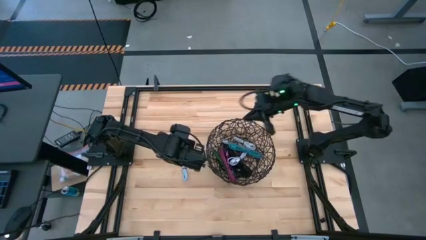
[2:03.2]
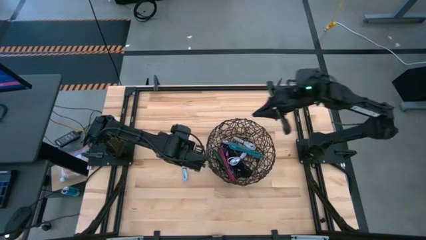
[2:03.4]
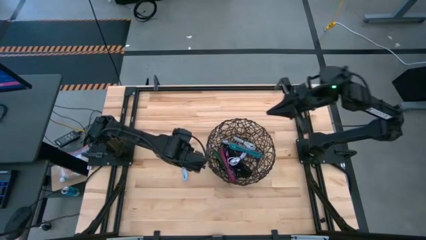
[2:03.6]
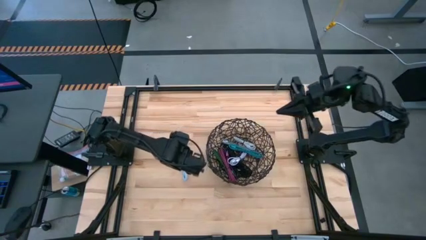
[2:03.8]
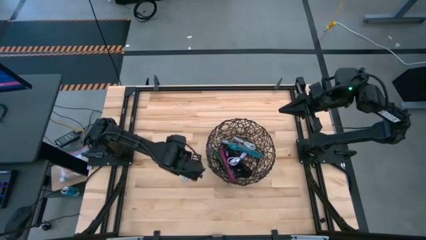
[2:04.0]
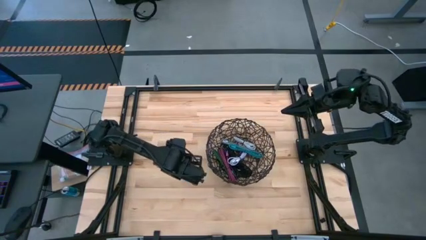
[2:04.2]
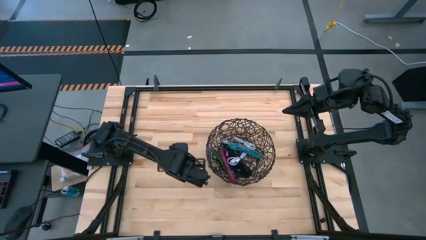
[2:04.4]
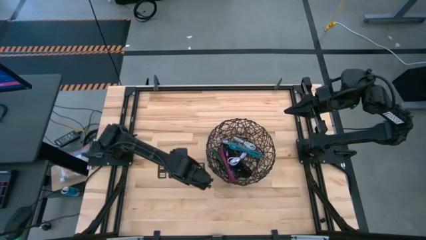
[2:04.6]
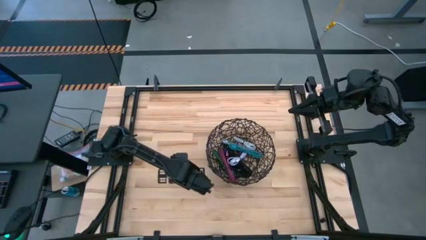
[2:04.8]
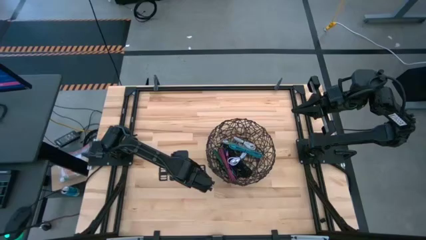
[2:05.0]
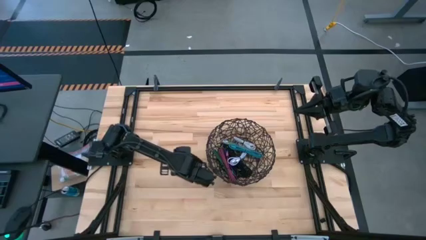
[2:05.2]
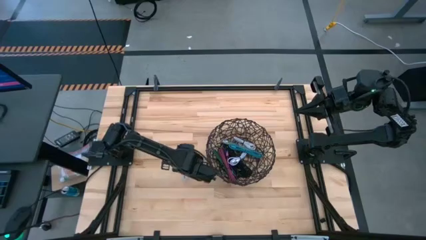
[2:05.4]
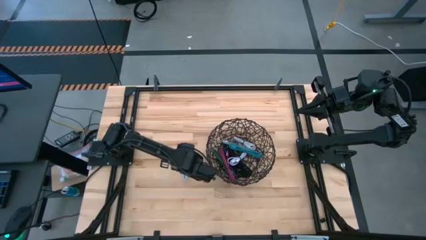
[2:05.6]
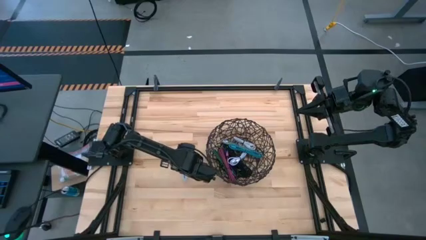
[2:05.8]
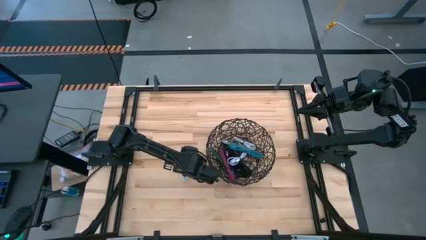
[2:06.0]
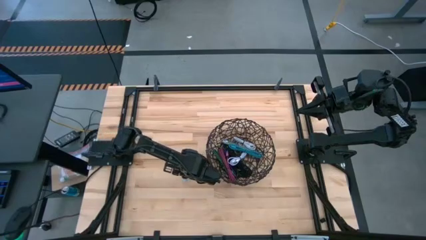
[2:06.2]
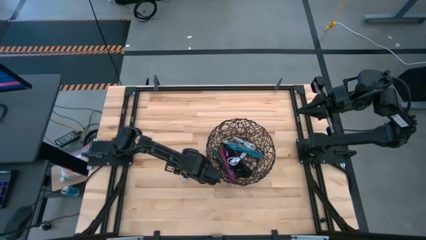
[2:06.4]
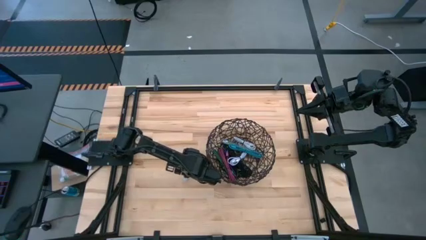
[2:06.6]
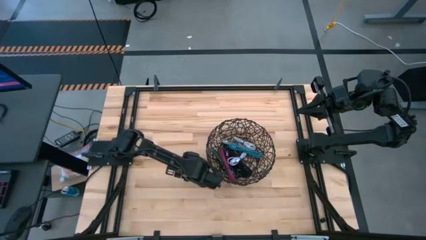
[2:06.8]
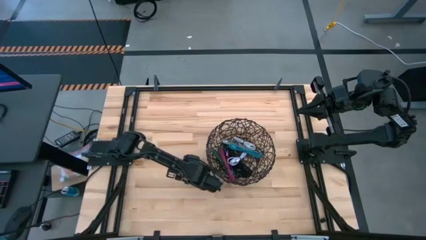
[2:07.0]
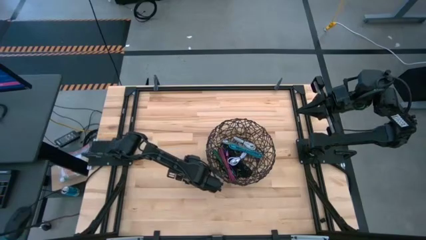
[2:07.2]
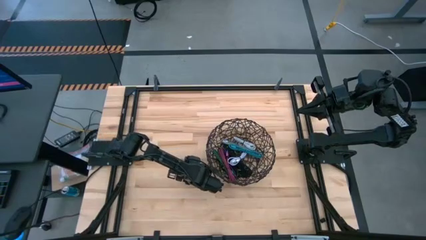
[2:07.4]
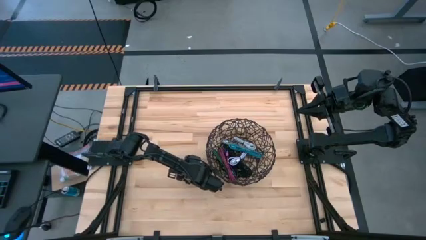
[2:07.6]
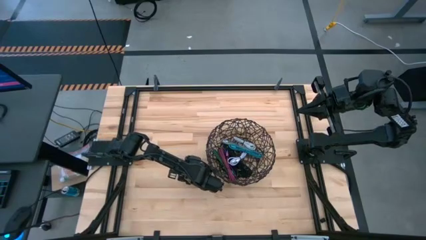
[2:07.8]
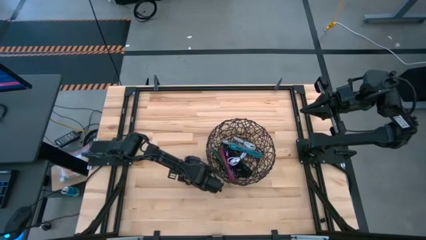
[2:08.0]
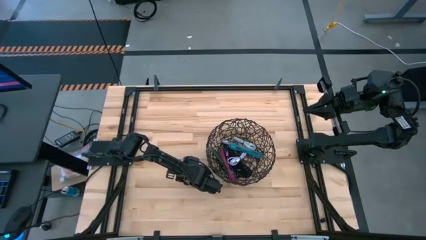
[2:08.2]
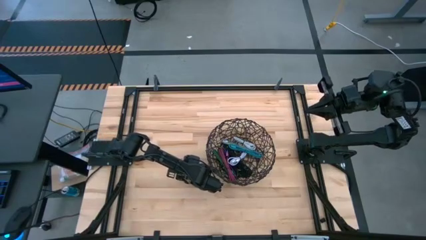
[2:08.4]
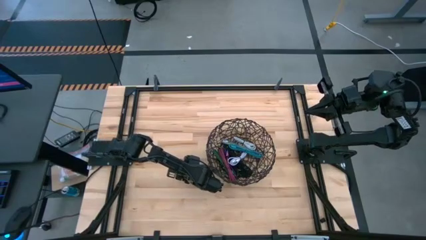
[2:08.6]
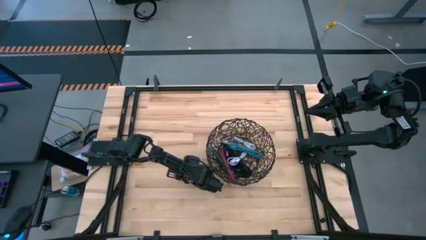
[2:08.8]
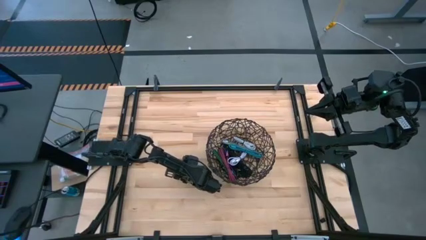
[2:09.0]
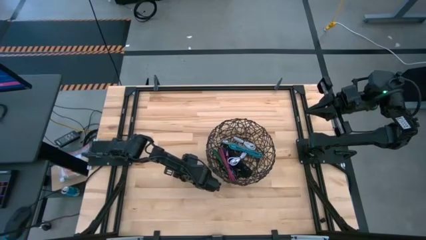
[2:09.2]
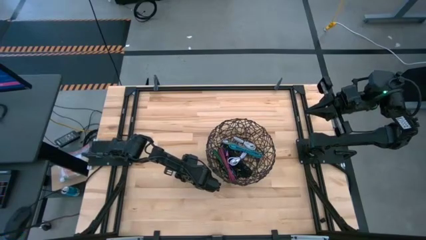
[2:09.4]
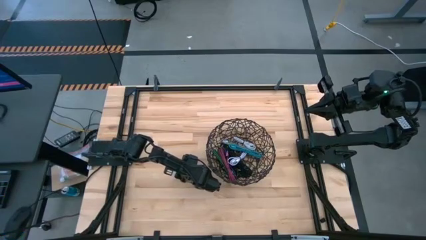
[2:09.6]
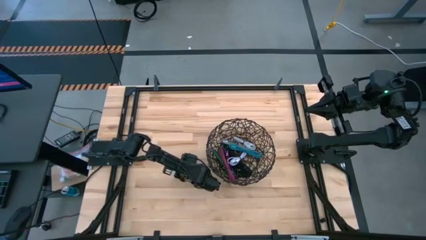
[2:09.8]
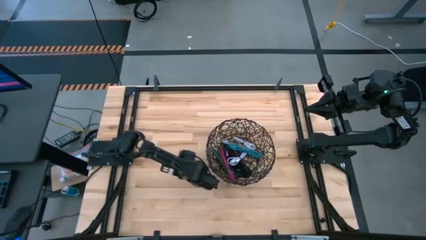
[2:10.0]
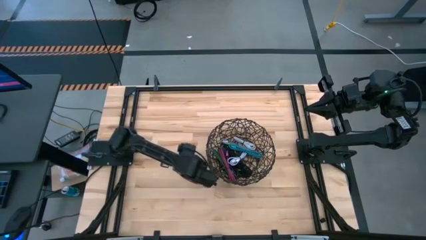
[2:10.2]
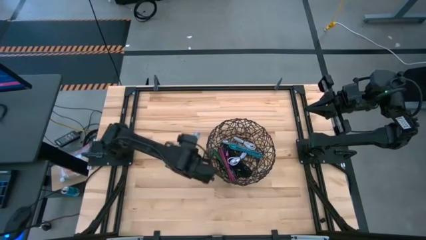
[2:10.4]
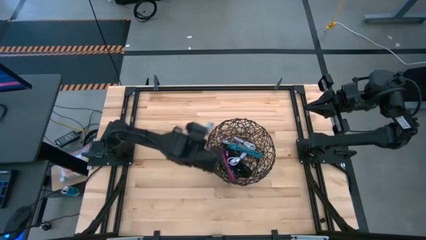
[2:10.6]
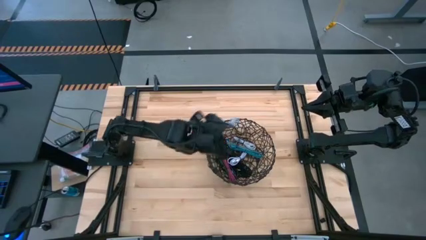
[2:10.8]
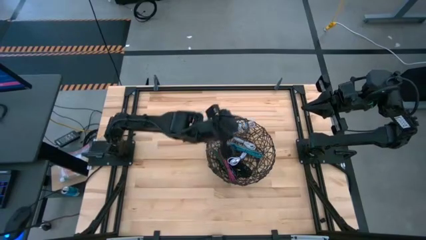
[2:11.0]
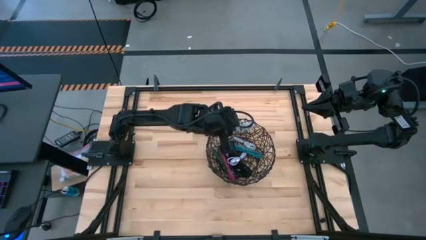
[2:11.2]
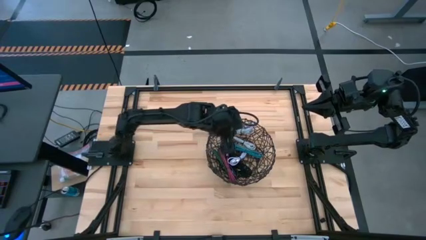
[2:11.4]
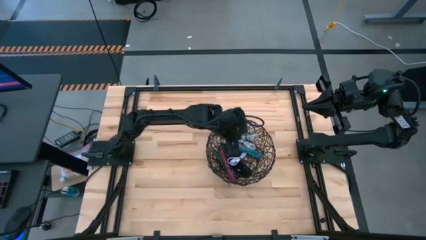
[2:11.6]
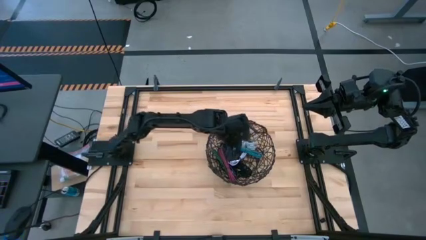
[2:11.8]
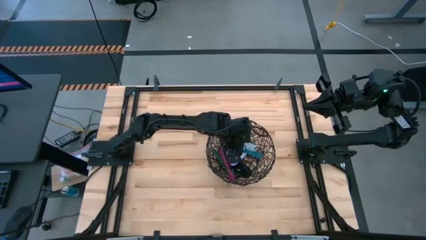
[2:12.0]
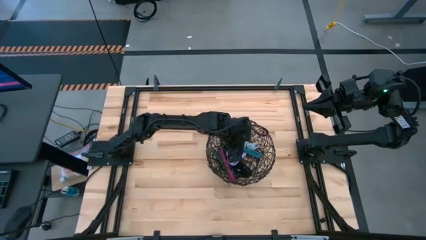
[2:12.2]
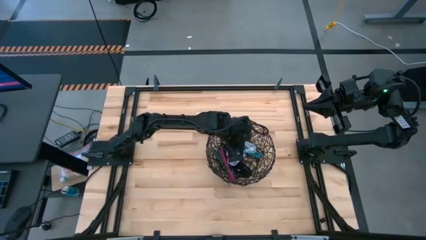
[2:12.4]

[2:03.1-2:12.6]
Task: Pick and place USB-C Cables
Put the gray charger cable into the black wire basket

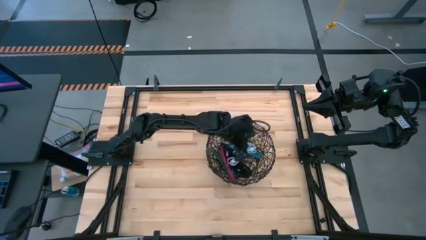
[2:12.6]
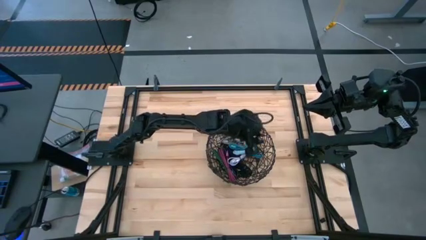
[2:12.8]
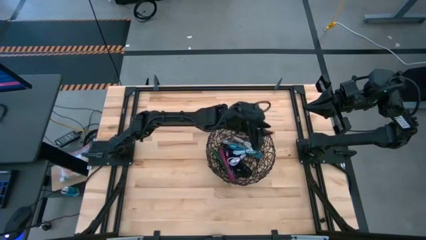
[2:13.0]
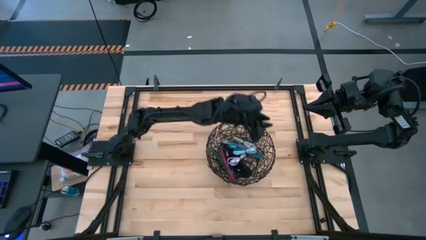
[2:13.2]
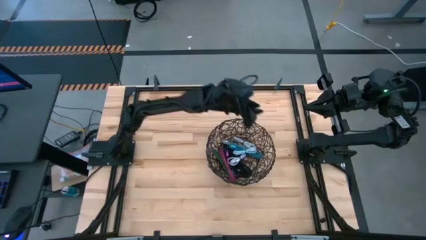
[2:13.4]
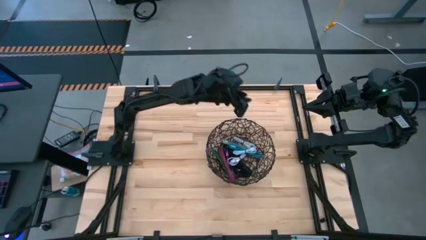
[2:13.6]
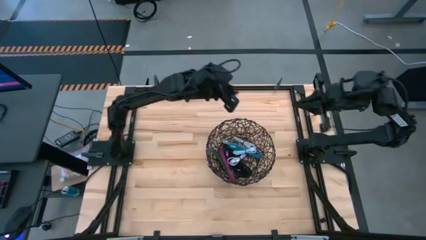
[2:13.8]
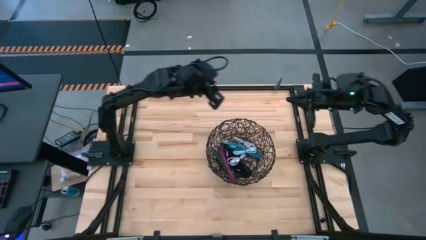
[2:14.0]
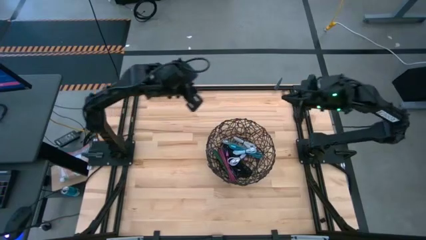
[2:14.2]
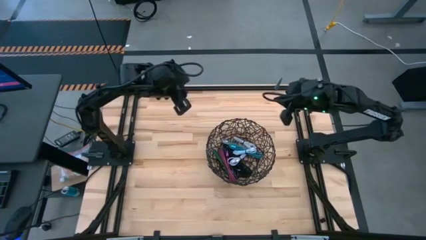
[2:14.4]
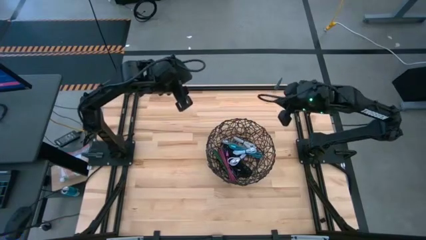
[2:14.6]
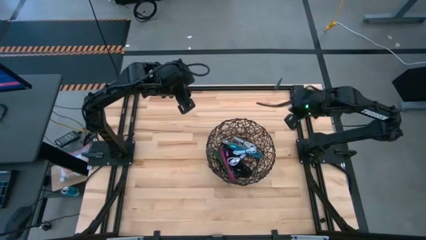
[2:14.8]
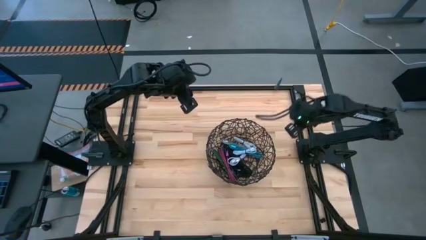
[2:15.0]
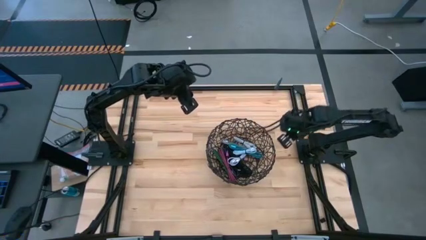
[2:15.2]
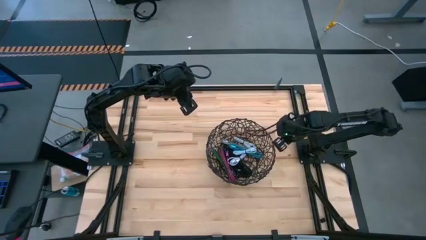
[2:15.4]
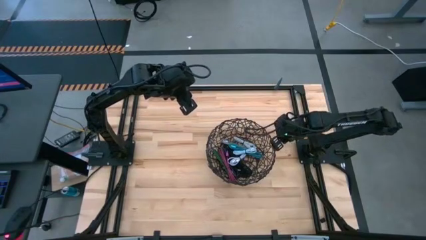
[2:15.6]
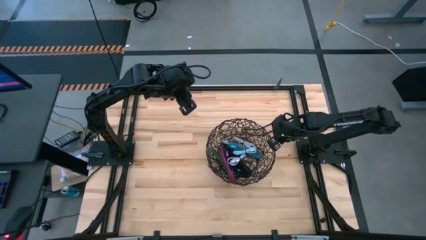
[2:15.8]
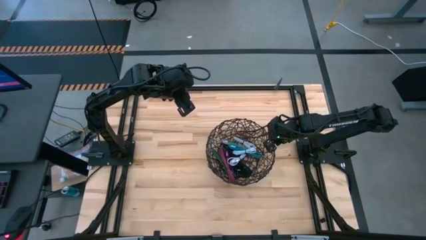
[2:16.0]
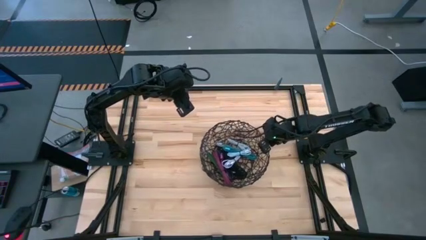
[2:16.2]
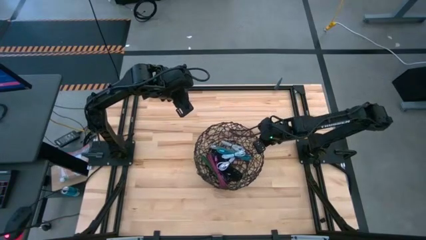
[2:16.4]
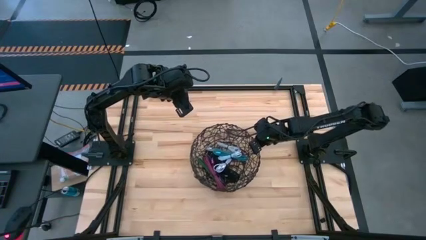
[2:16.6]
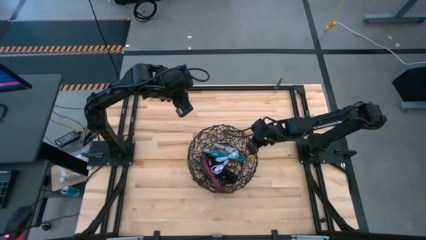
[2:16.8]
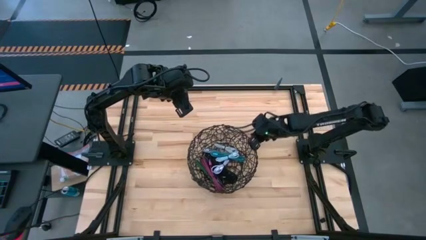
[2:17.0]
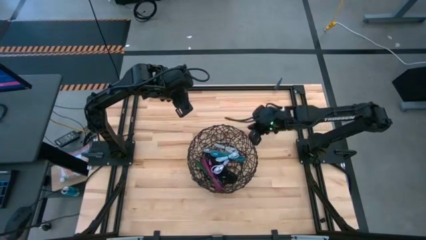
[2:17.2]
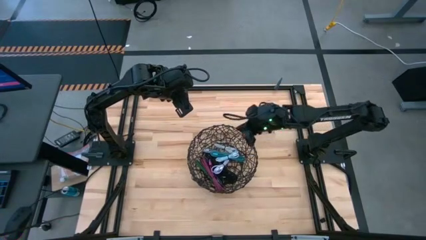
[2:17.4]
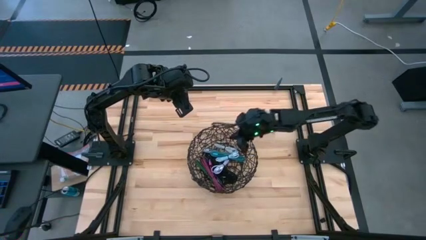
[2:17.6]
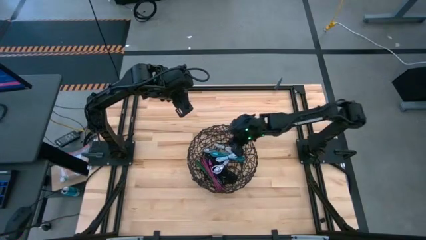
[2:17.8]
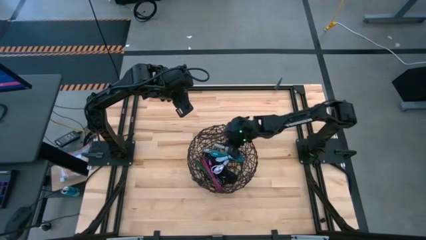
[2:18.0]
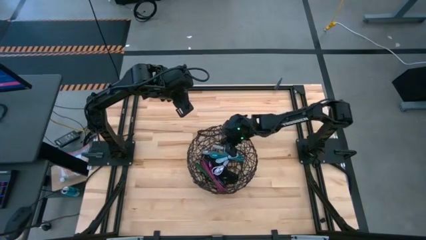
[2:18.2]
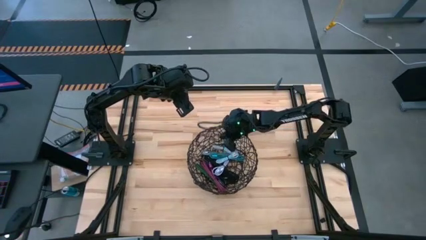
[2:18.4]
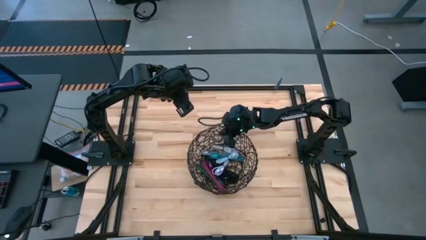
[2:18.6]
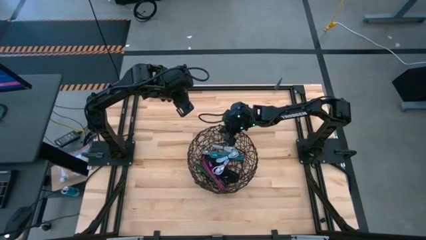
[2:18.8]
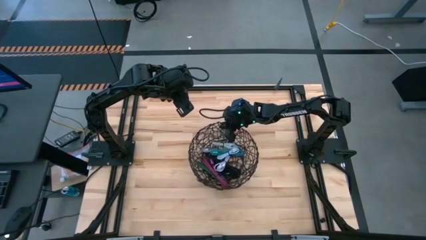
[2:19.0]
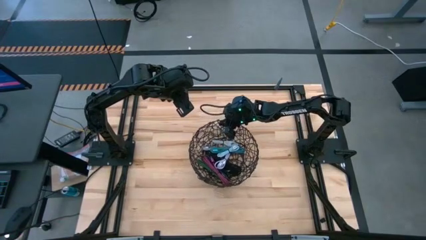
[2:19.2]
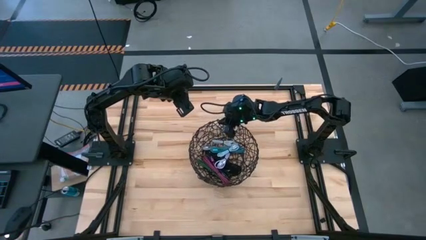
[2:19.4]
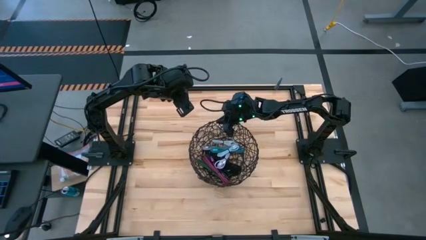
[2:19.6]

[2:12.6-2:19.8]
Adjust the black wire basket on the table

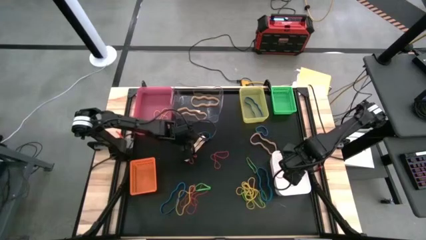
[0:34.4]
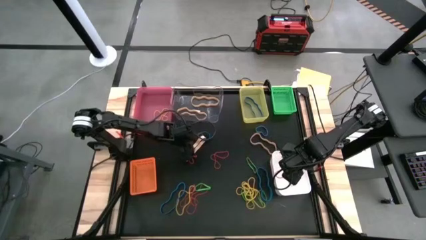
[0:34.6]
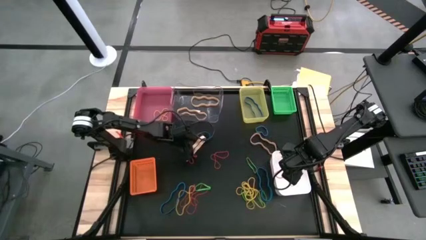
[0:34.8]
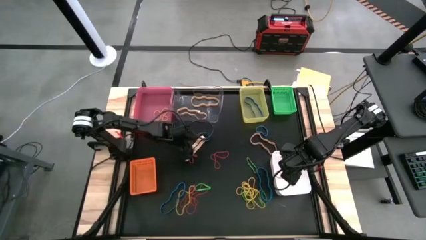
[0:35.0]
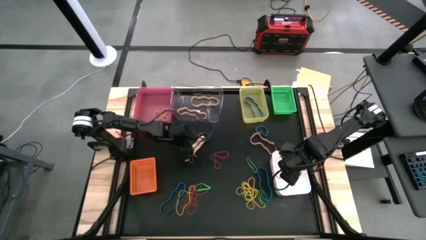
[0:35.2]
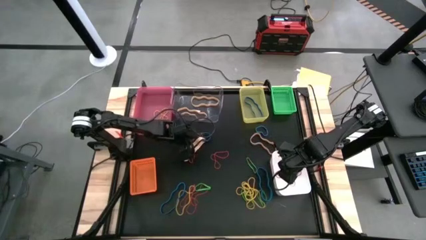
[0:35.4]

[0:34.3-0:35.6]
Task: Sort rubber bands into baskets
Put the blue rubber band into the yellow bin
